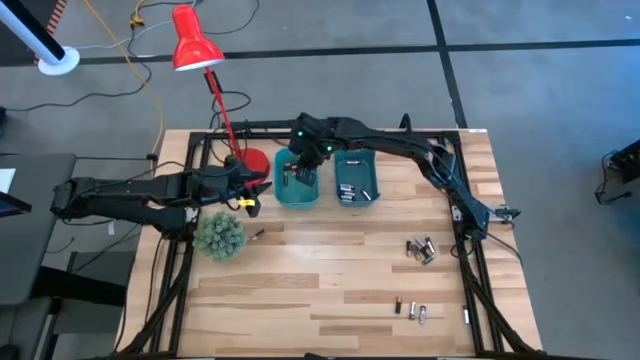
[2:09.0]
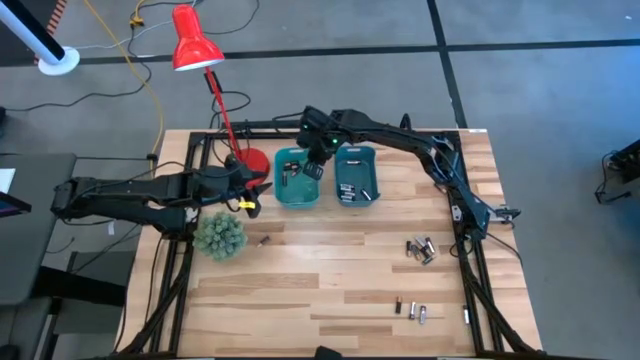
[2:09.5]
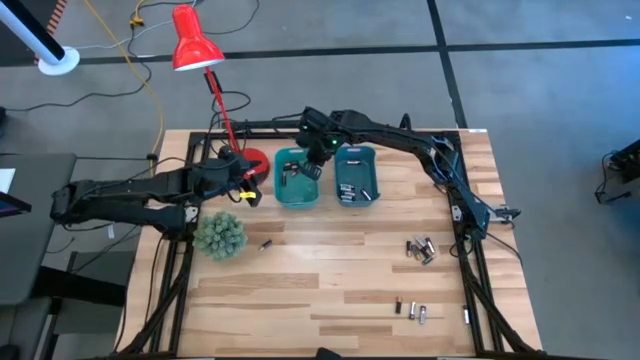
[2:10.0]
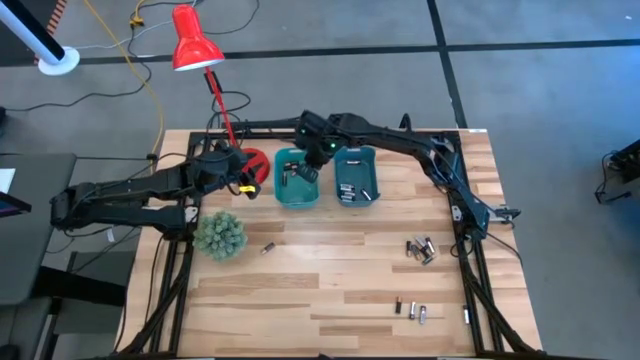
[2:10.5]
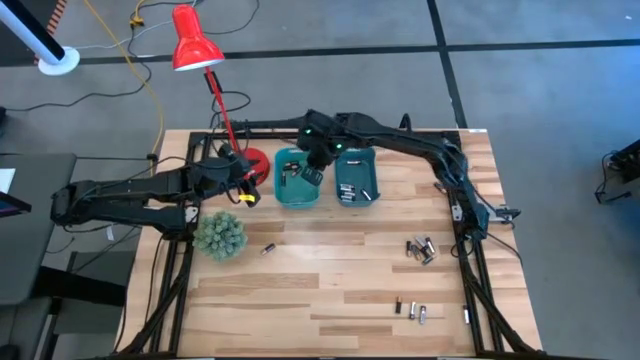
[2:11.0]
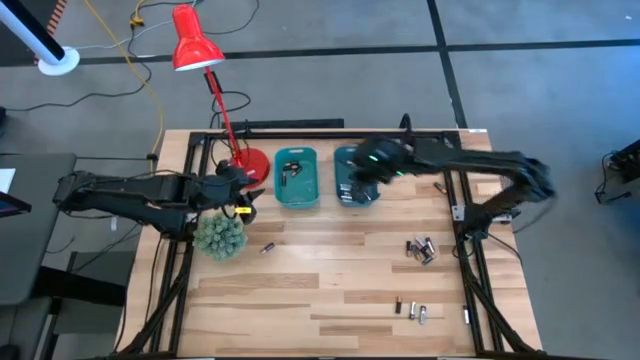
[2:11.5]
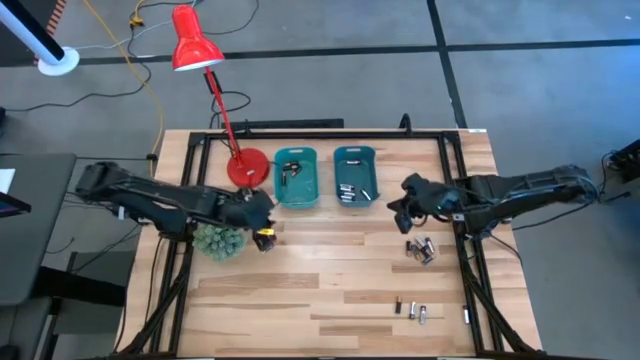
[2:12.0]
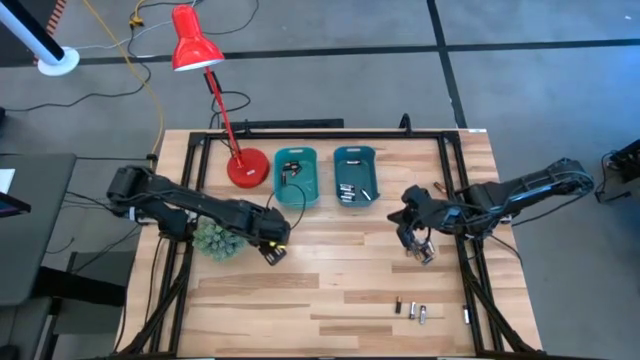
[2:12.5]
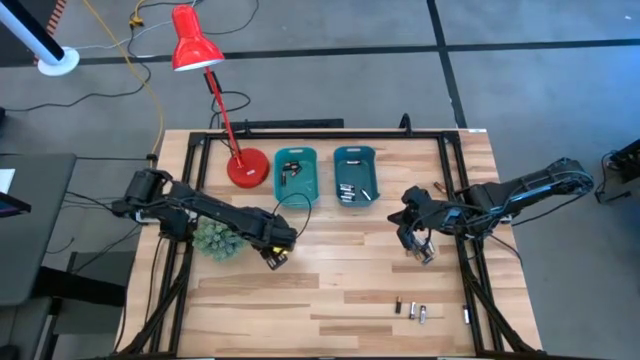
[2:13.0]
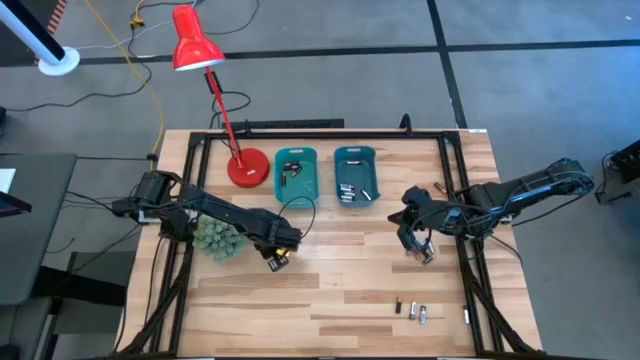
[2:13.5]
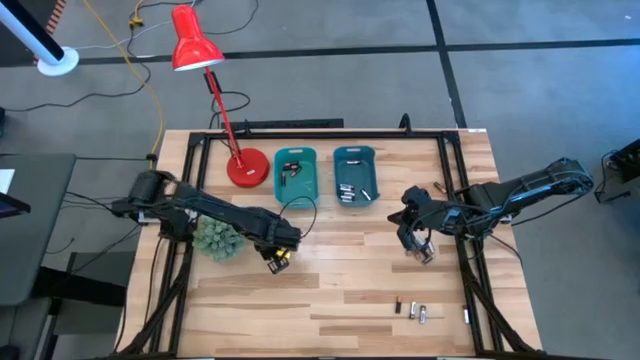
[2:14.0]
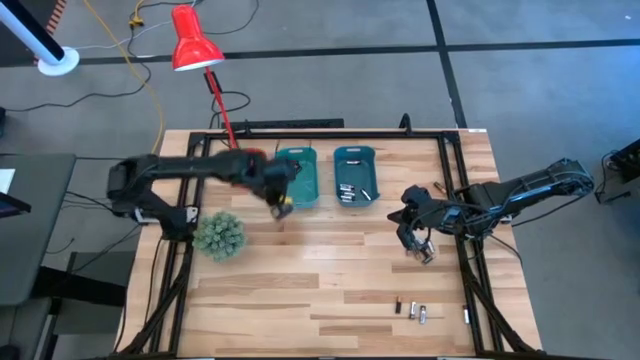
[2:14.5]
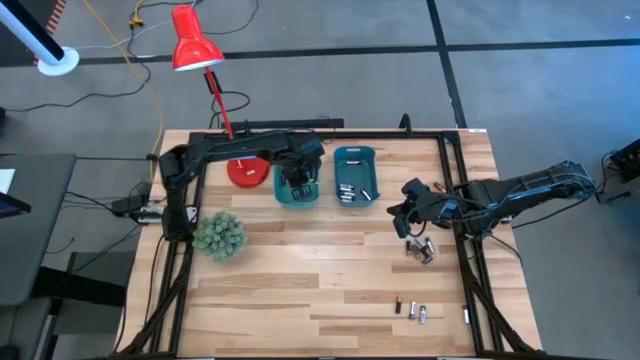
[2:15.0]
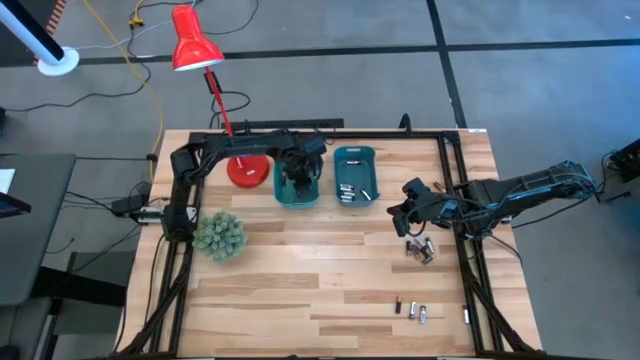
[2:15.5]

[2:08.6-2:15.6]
Task: Sort batteries
Put the black battery into the green bin

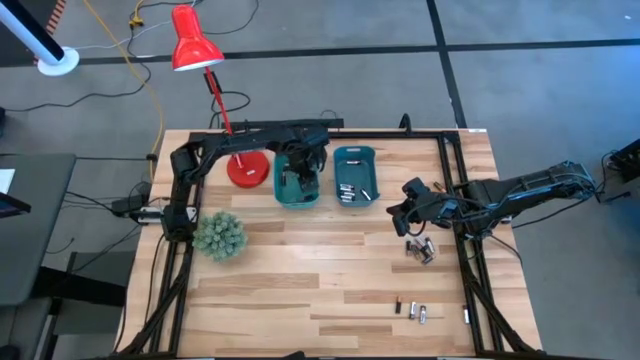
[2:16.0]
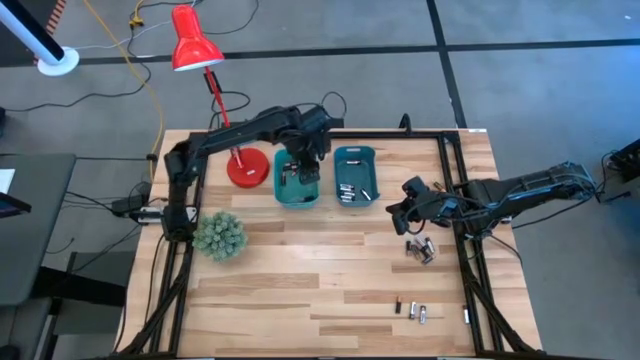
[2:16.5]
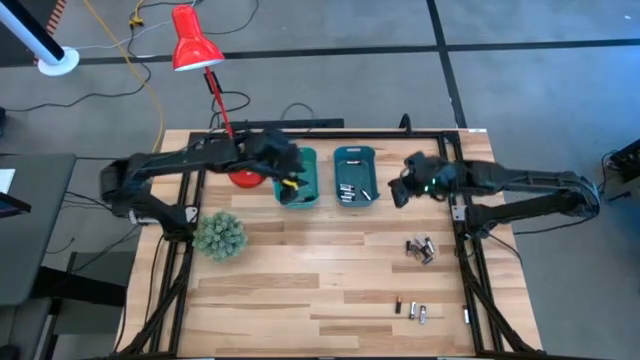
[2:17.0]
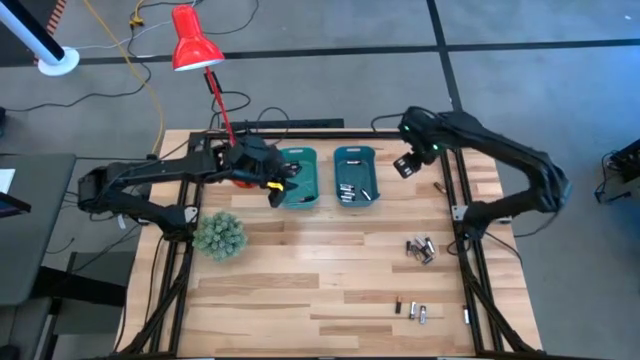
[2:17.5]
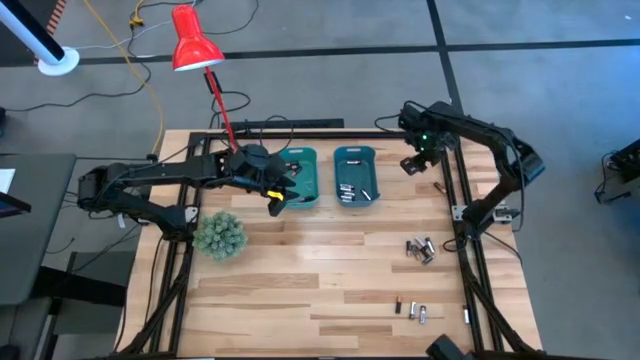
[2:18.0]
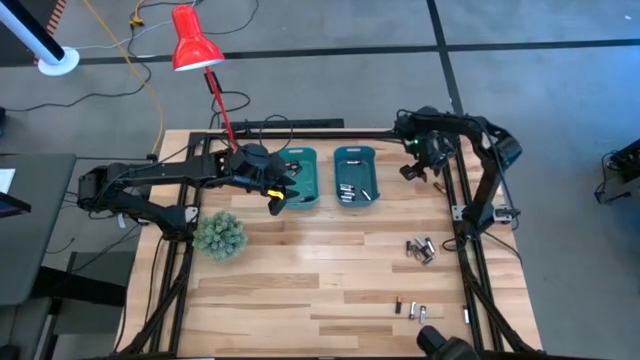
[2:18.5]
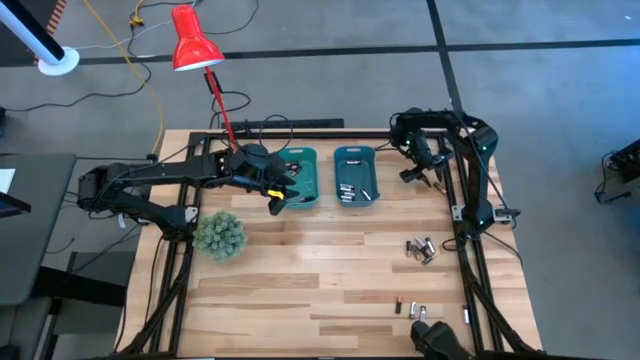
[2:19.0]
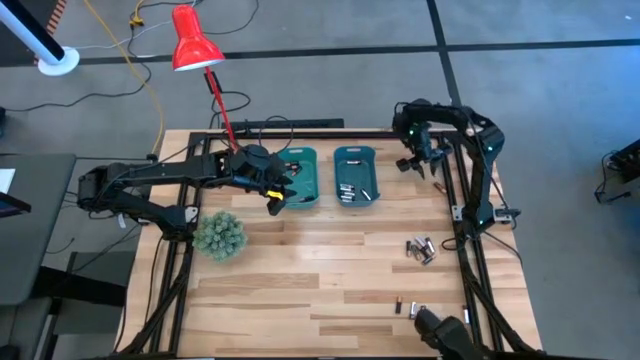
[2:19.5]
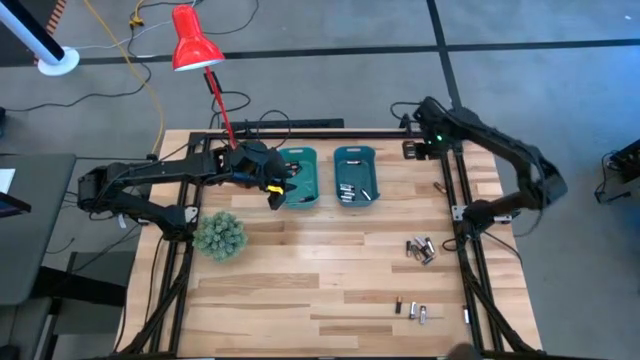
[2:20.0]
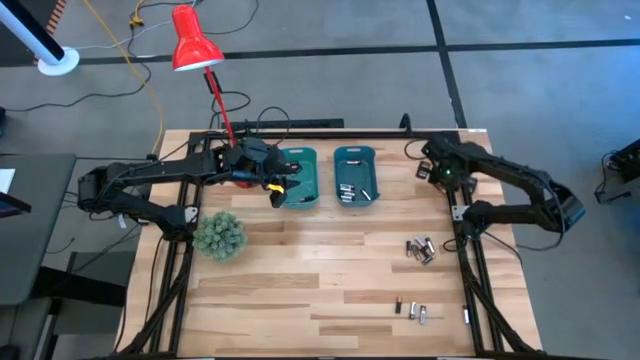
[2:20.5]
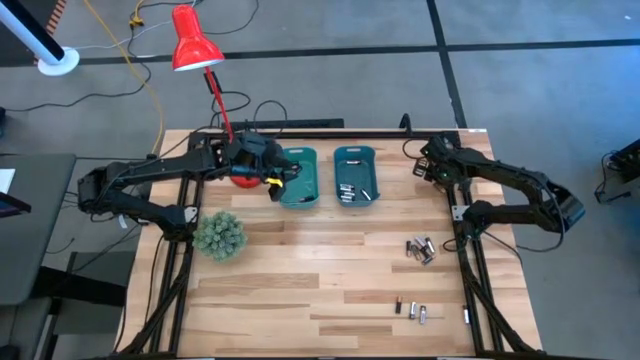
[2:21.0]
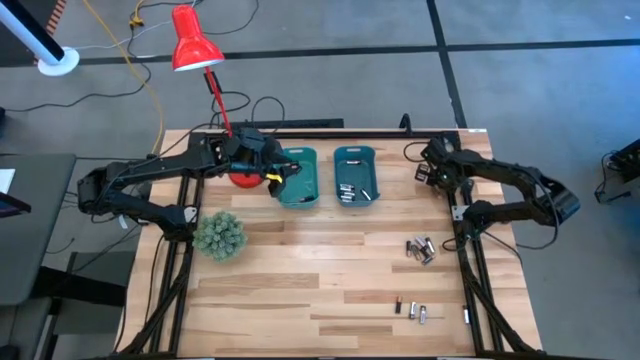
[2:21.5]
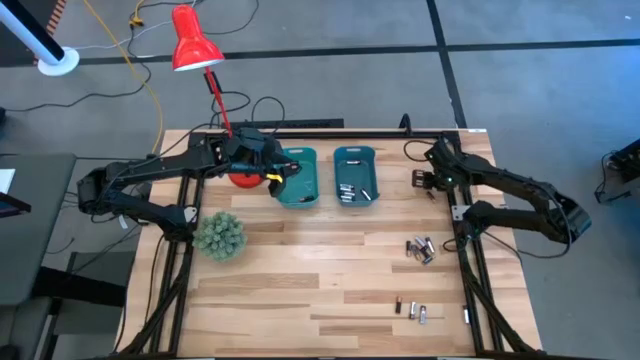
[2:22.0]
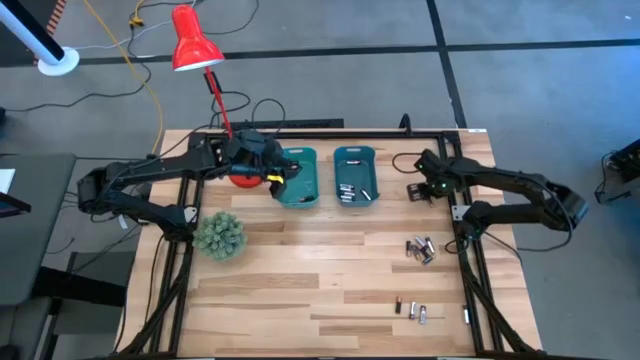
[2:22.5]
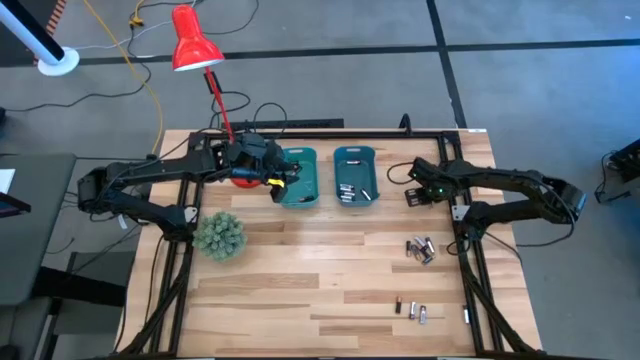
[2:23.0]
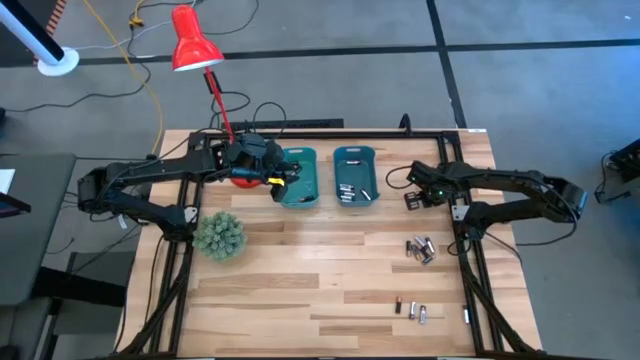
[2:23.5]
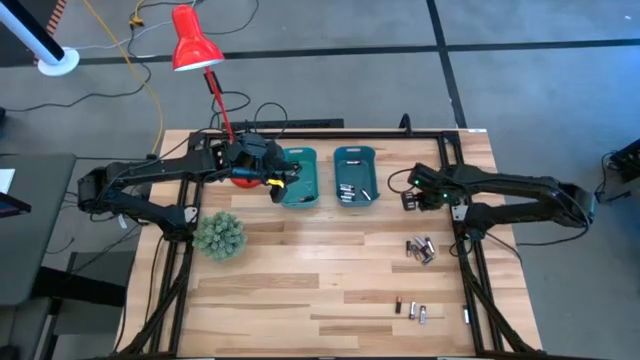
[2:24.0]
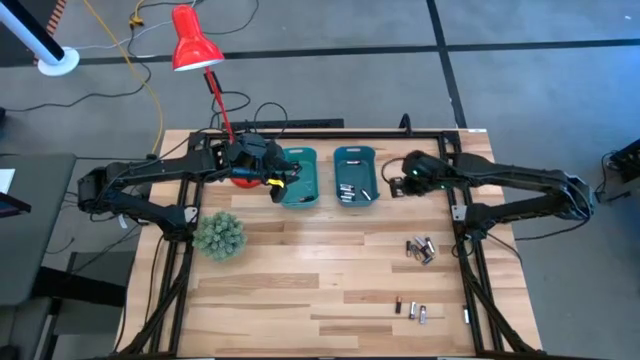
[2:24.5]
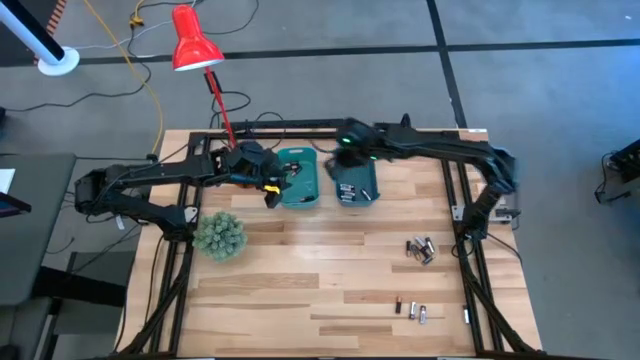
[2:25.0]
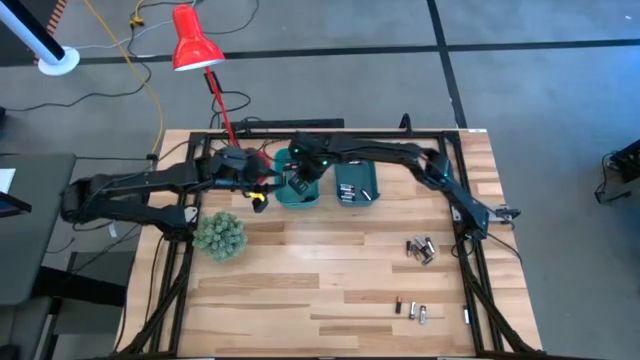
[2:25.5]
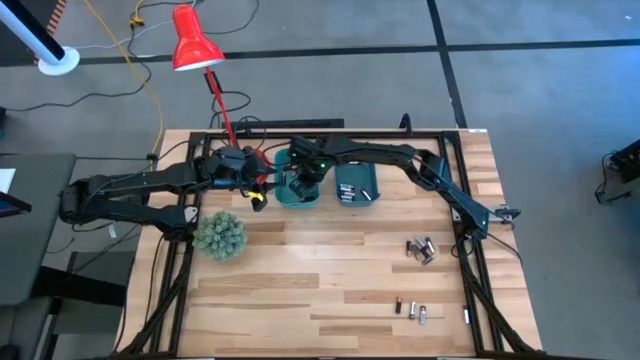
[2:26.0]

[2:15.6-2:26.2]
Put the black battery into the green bin

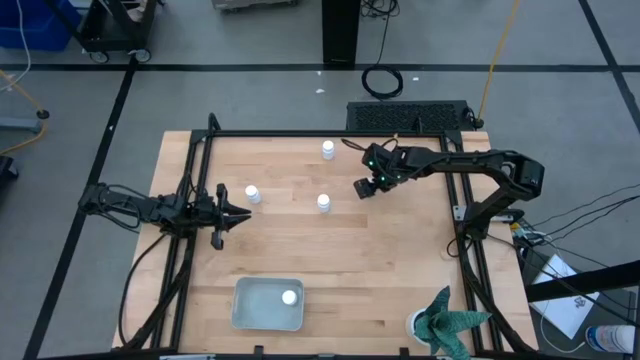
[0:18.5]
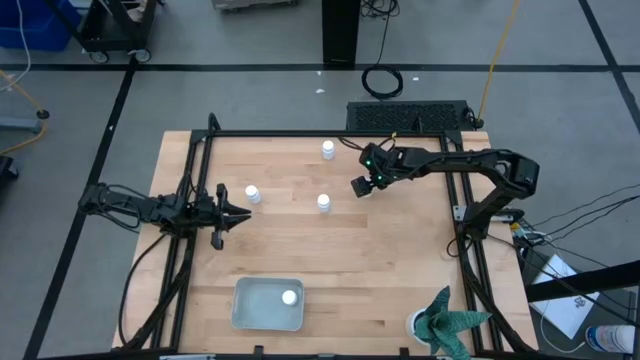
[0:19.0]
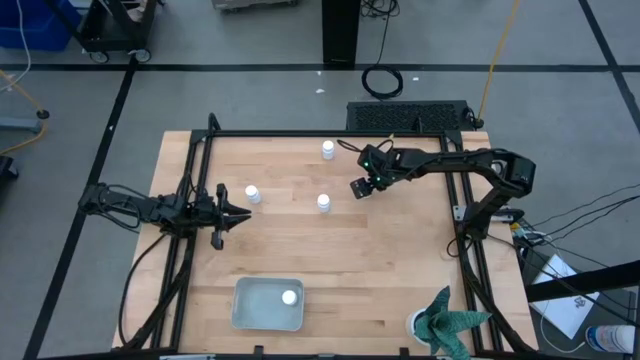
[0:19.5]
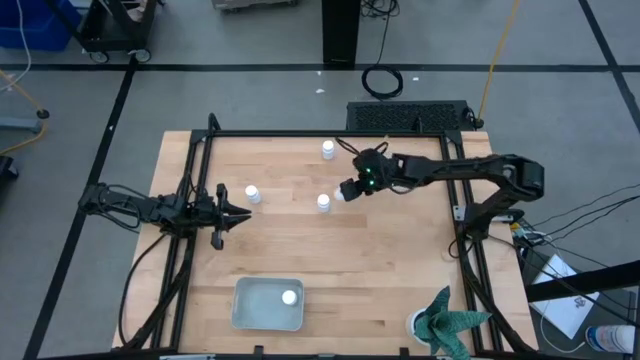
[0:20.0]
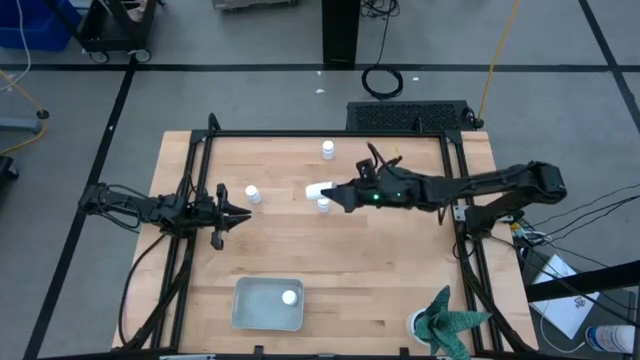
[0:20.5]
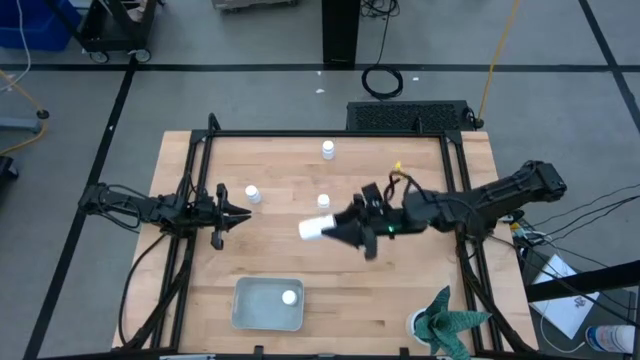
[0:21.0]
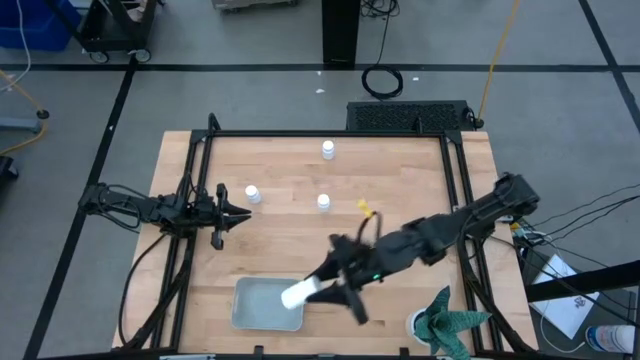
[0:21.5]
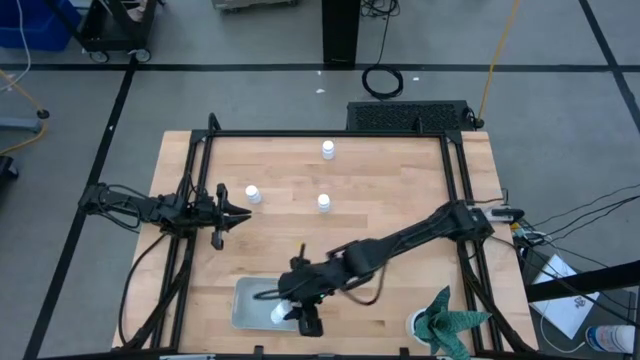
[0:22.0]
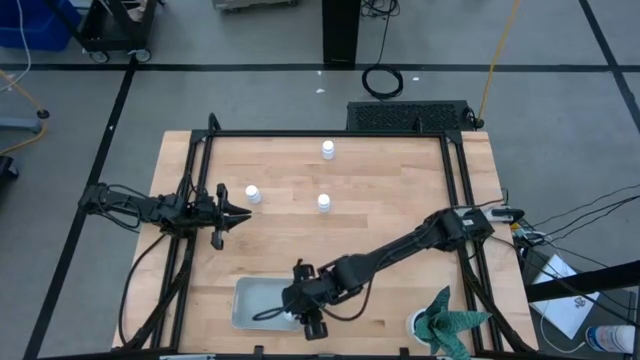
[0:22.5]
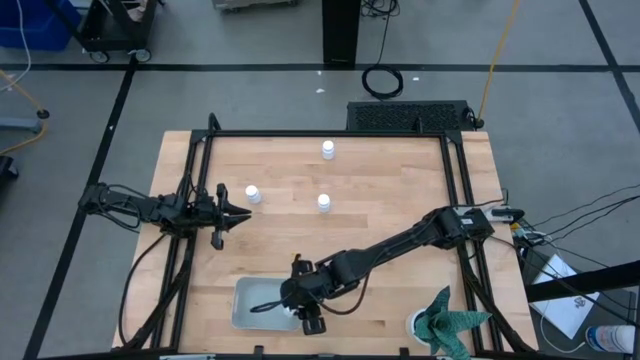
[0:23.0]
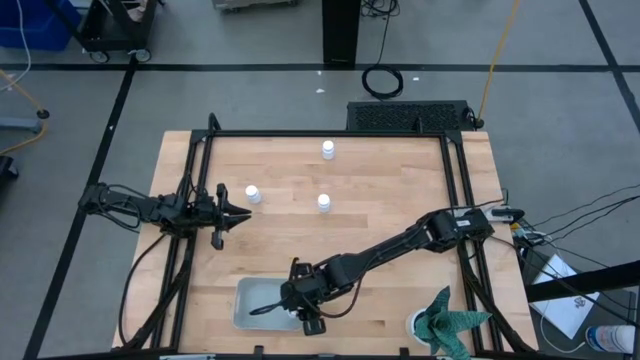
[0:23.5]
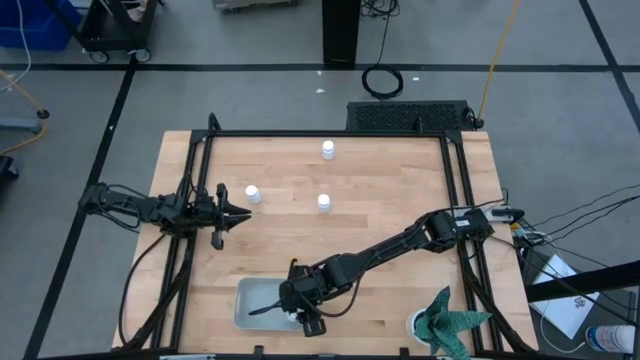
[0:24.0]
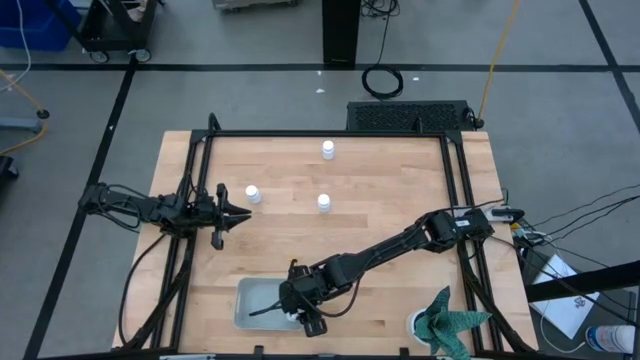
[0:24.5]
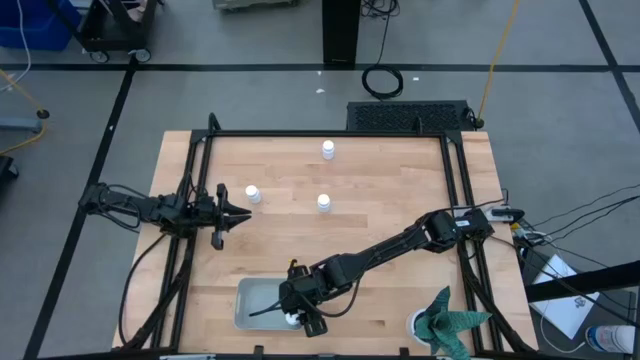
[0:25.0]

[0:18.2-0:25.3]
Task: Pick and place pill bottles into a basket
Put the white medicine bottle into the gray bin
